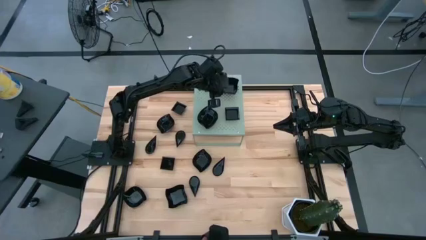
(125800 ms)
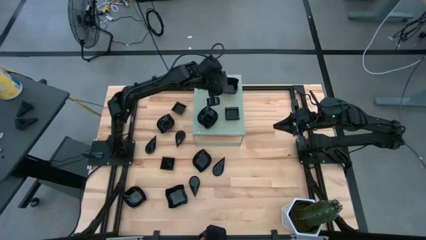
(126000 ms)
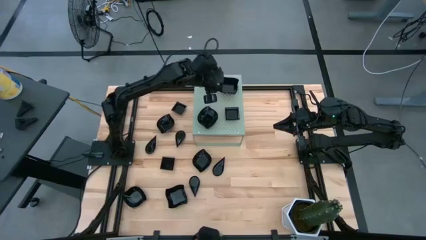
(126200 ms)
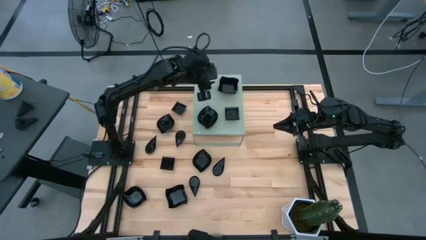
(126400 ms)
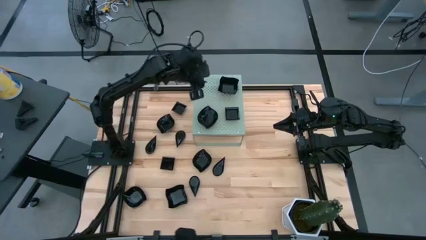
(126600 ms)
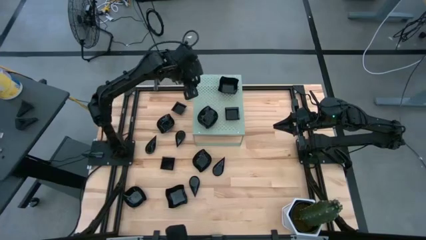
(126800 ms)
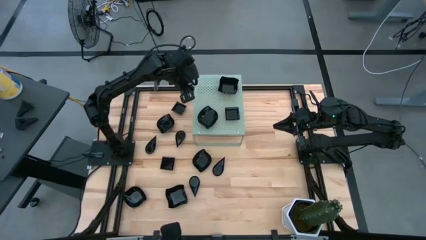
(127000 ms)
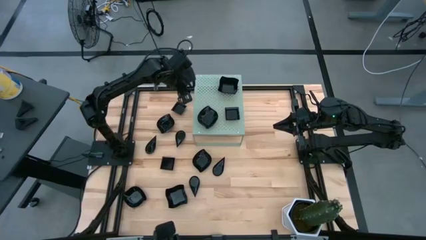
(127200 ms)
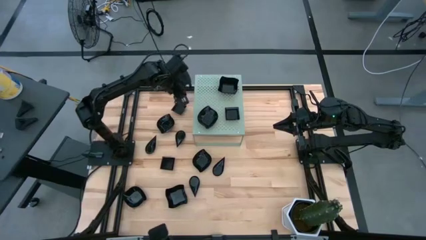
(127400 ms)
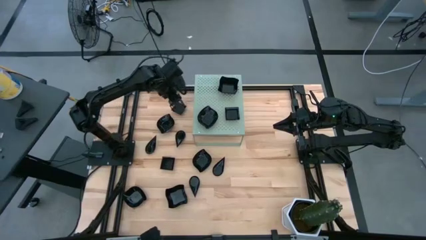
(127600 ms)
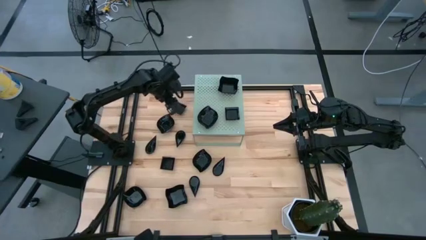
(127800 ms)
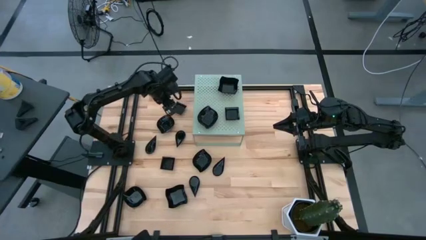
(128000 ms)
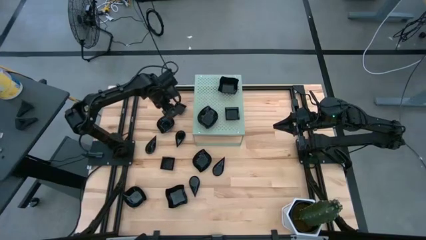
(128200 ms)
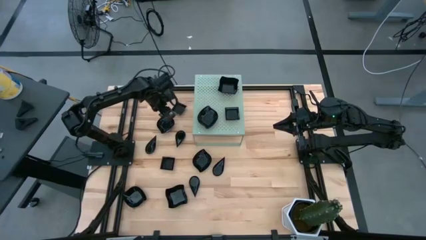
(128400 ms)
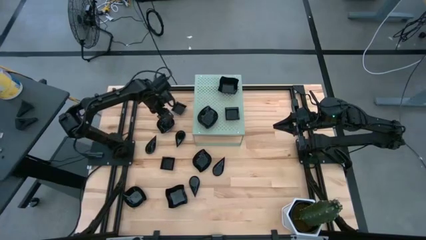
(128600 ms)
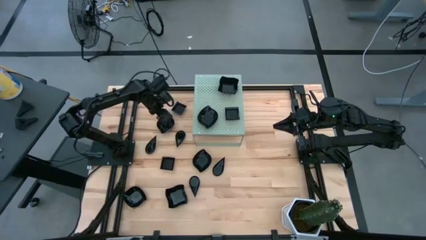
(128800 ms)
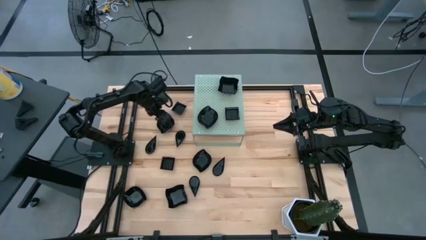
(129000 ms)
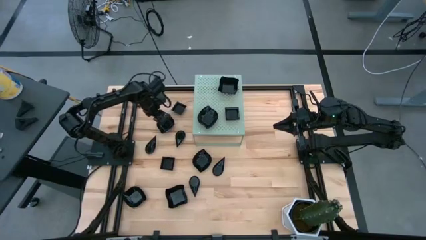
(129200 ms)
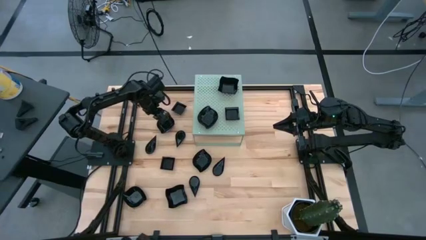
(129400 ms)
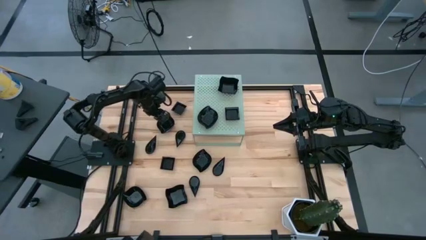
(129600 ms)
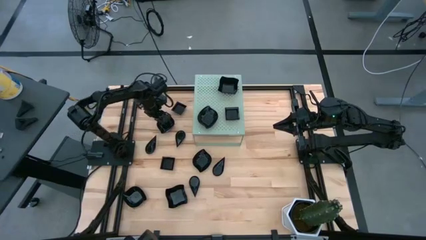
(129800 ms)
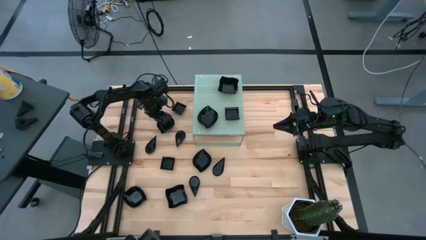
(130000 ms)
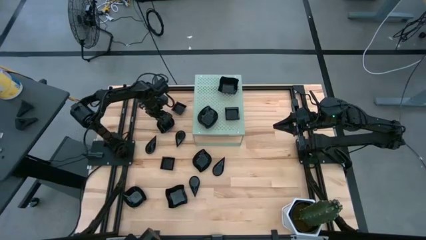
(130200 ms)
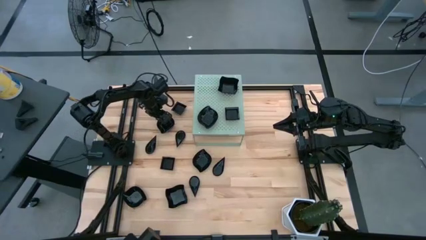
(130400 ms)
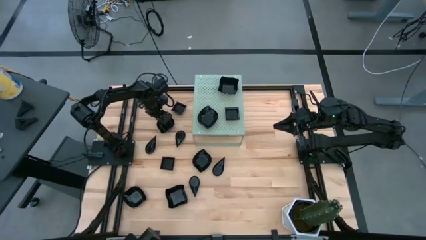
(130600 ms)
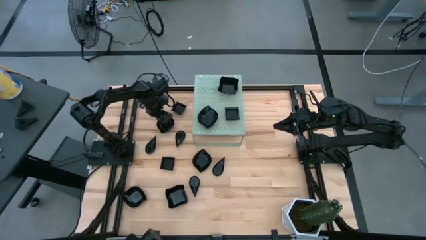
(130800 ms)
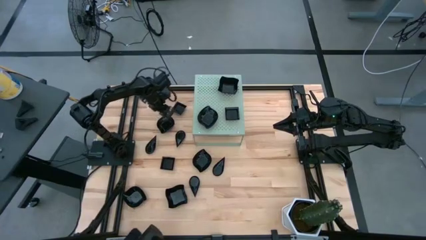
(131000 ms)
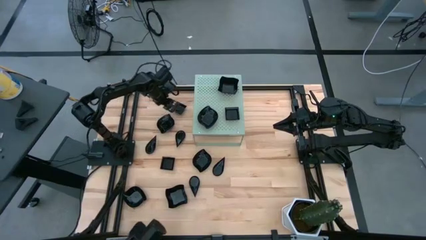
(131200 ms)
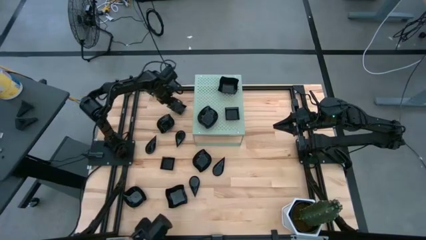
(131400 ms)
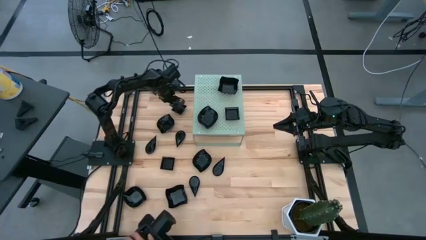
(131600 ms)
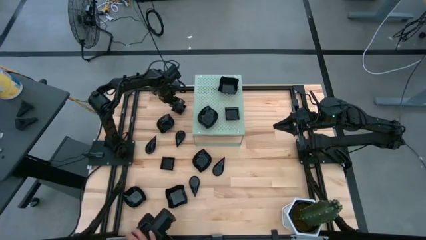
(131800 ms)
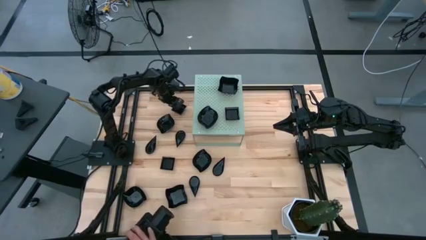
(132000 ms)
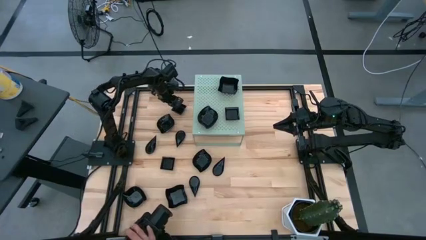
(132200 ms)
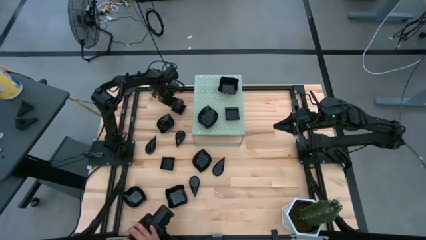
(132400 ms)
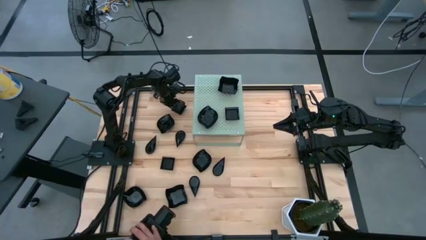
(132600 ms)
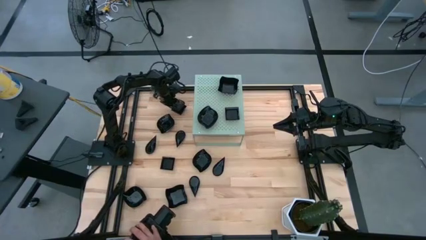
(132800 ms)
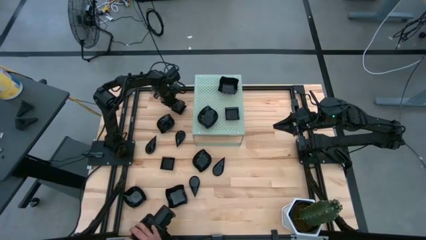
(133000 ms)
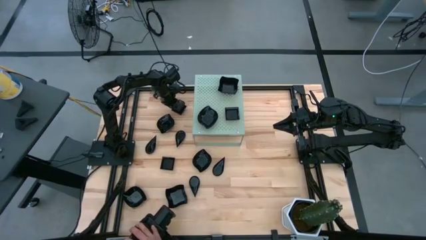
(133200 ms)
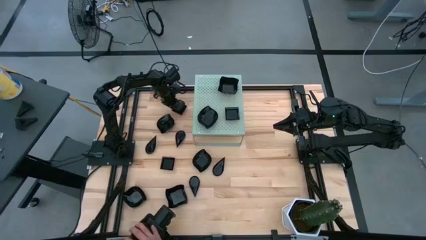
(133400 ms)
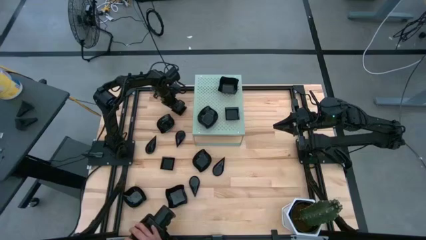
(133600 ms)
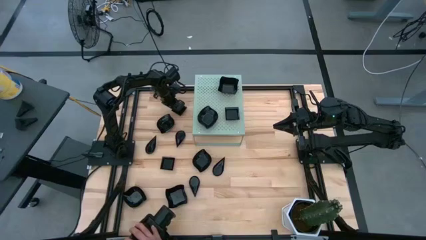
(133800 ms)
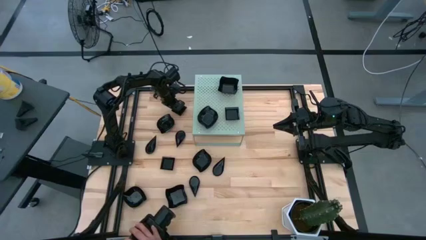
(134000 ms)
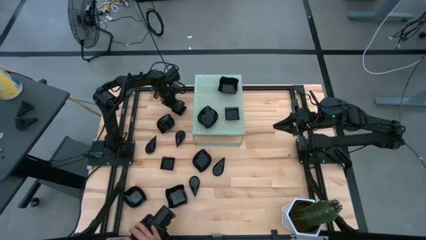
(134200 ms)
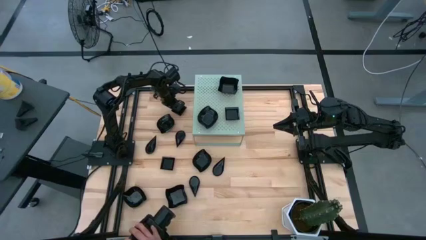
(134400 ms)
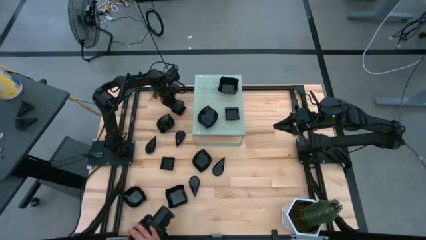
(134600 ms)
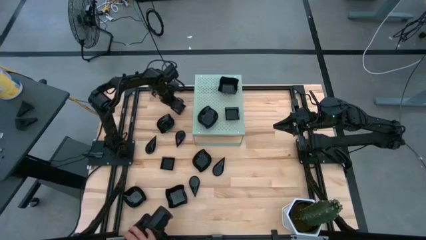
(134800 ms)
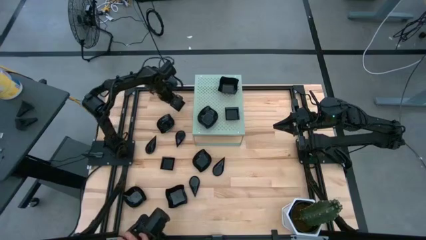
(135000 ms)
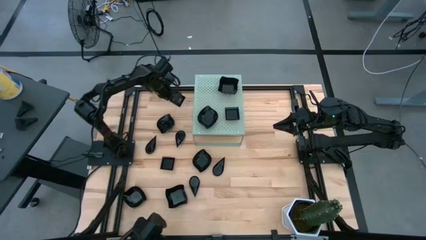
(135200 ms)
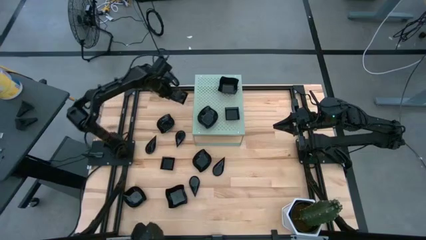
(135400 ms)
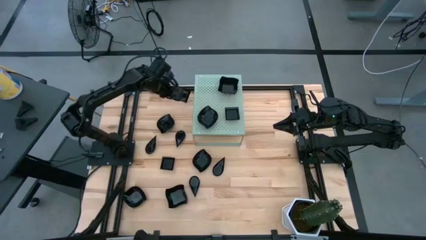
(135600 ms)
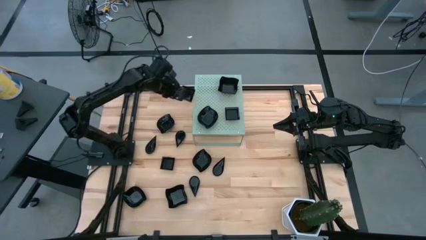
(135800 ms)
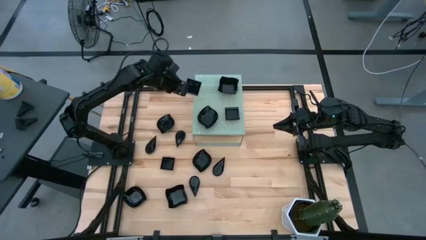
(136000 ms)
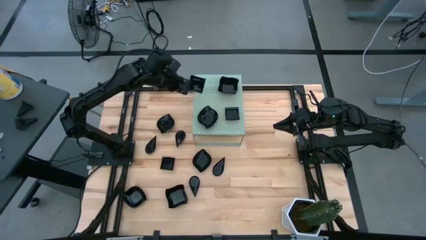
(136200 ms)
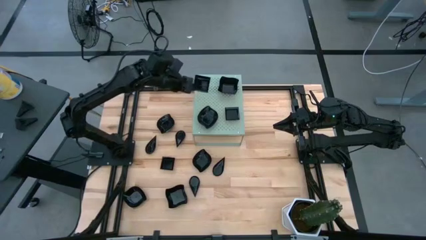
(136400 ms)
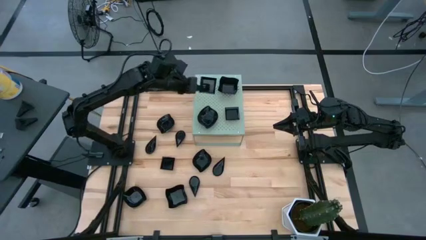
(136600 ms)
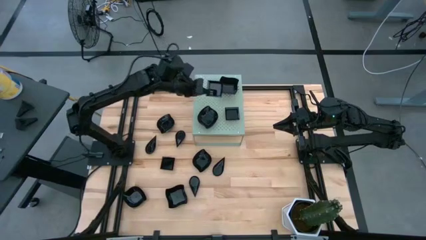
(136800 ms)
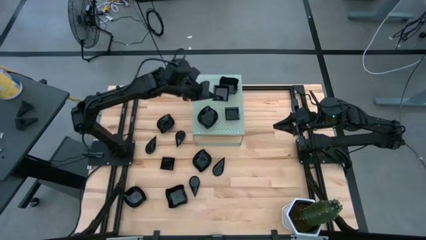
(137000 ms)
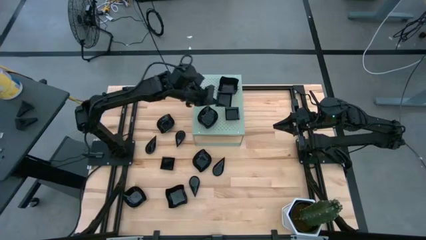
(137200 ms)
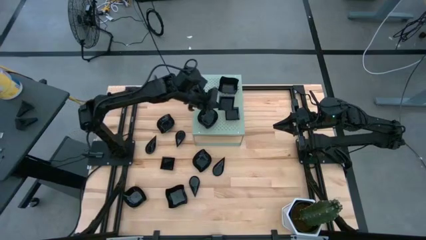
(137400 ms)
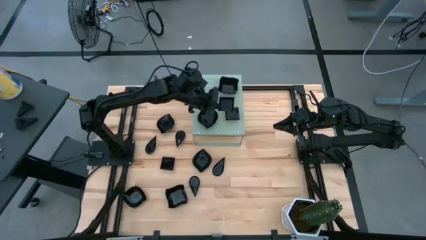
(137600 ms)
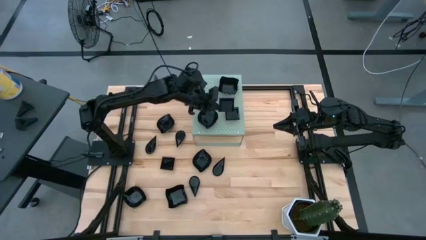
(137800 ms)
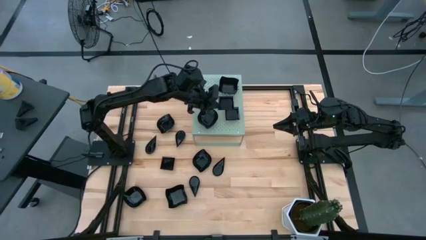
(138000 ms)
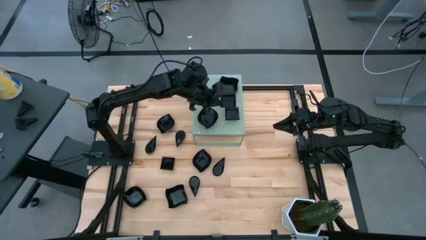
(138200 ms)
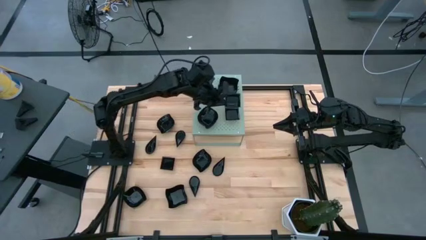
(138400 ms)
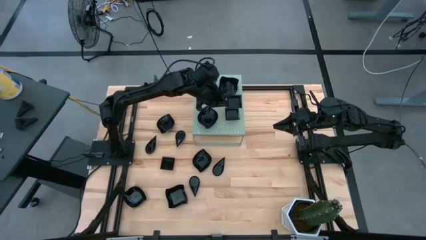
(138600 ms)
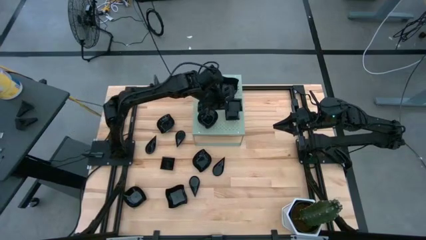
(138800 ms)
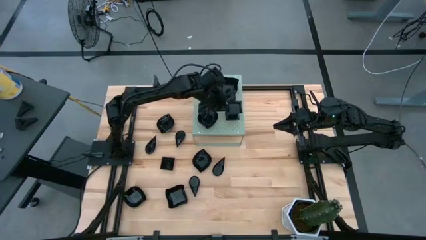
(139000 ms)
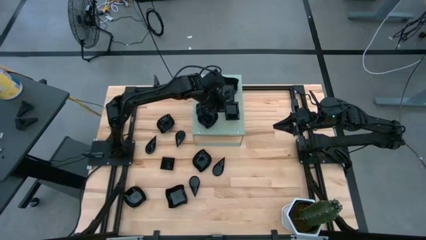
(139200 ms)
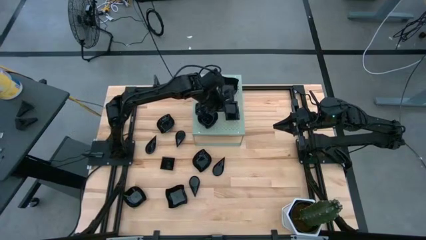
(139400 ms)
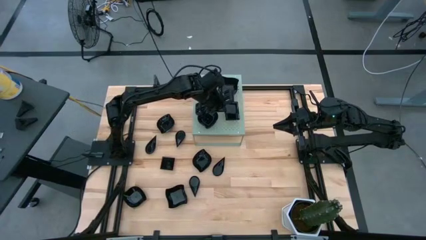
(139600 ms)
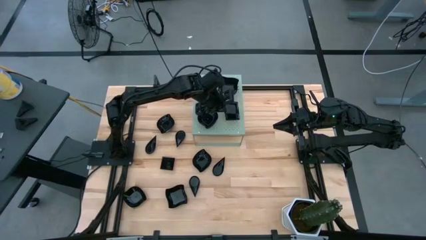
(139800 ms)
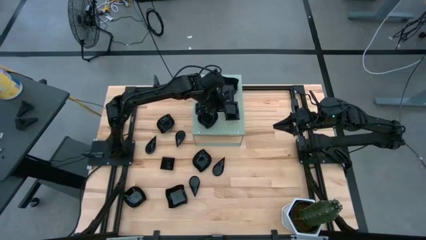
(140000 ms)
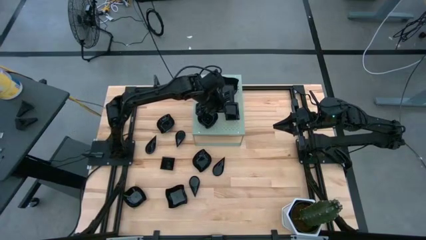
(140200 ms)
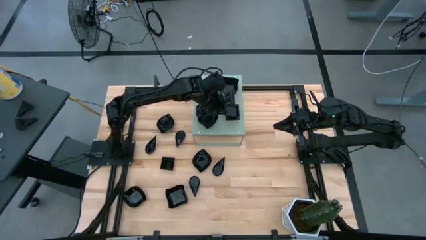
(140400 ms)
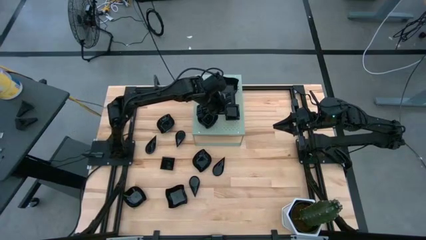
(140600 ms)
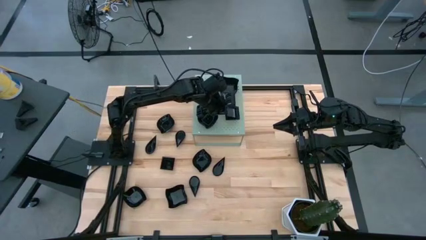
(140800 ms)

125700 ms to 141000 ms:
Task: Pick & Place Mini shaped plates
Stack the square plate on top of the square plates on the shelf
